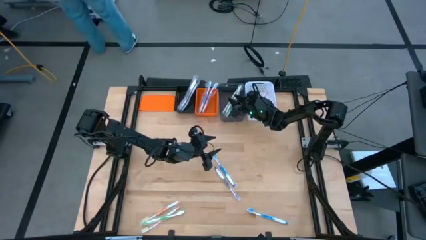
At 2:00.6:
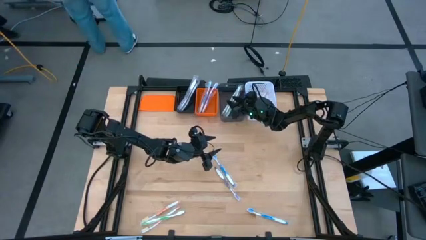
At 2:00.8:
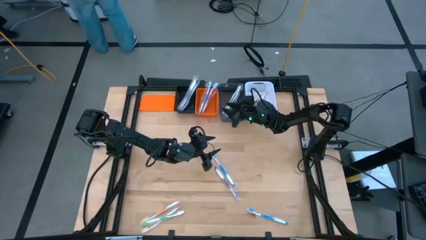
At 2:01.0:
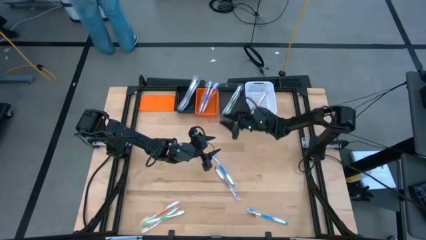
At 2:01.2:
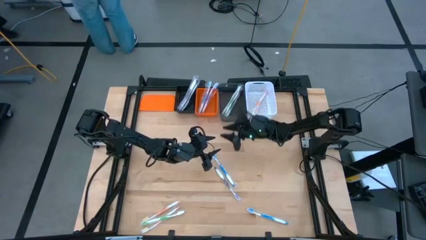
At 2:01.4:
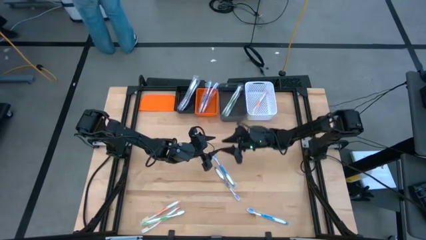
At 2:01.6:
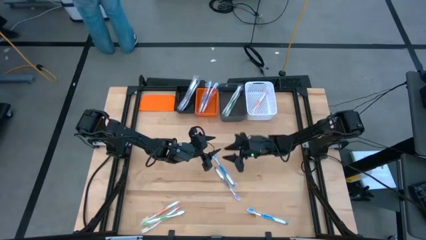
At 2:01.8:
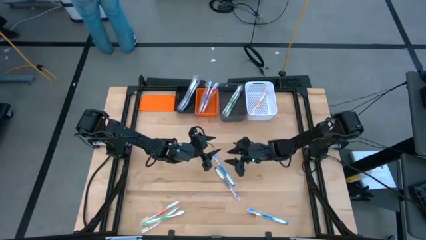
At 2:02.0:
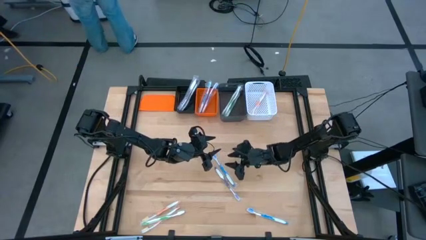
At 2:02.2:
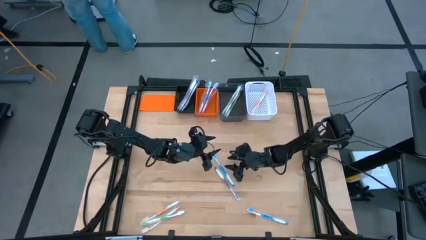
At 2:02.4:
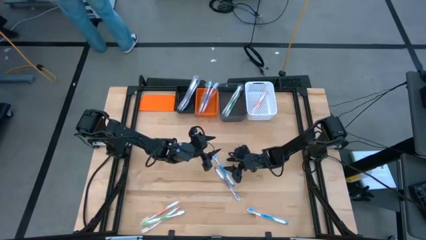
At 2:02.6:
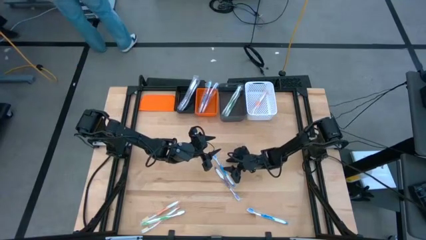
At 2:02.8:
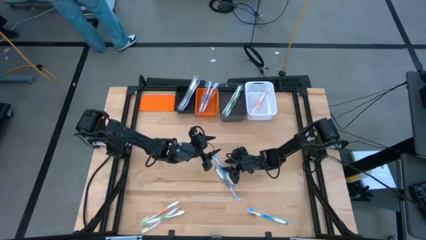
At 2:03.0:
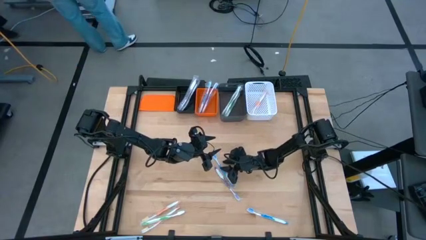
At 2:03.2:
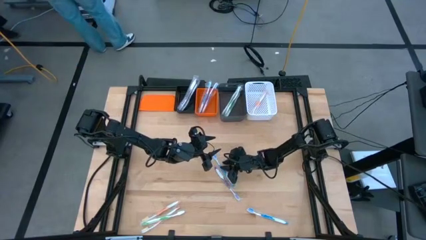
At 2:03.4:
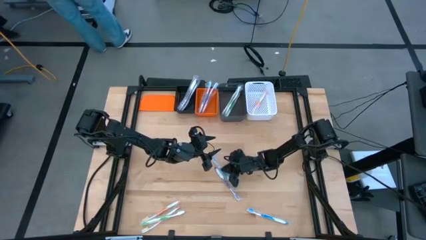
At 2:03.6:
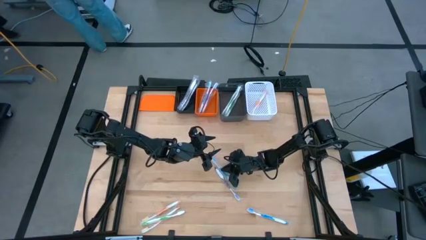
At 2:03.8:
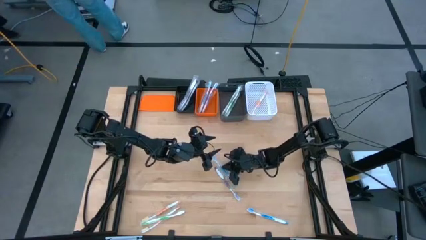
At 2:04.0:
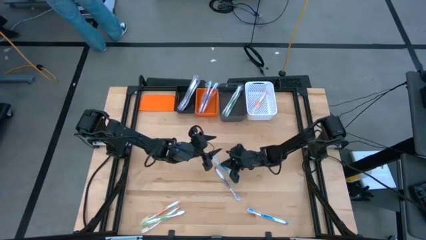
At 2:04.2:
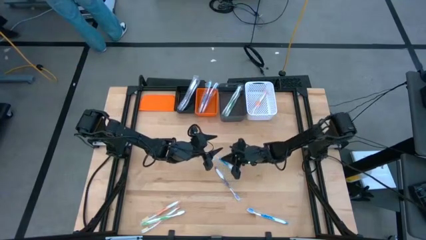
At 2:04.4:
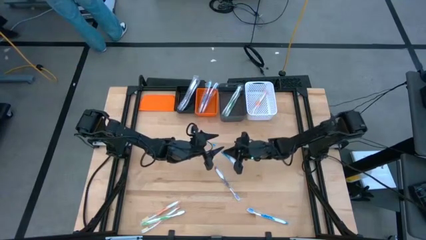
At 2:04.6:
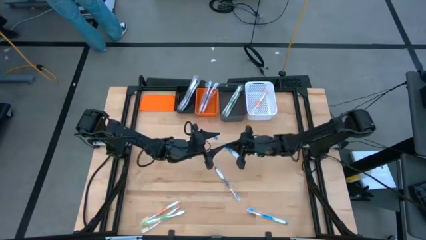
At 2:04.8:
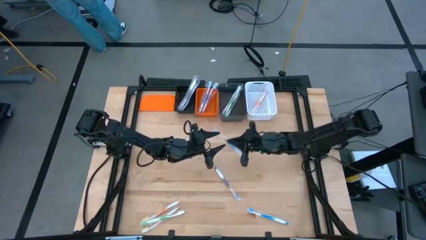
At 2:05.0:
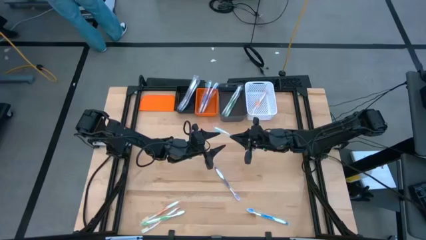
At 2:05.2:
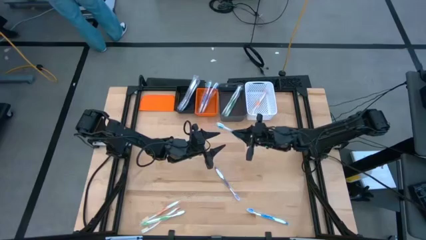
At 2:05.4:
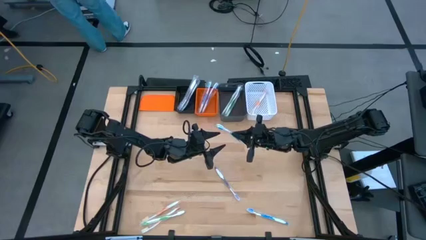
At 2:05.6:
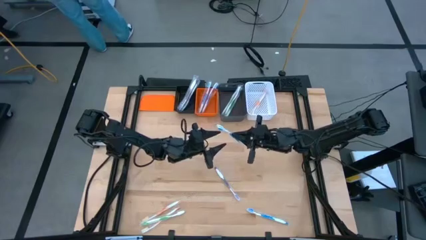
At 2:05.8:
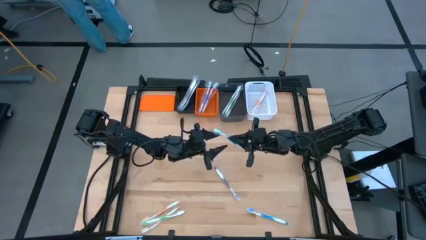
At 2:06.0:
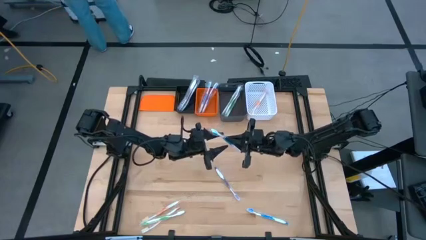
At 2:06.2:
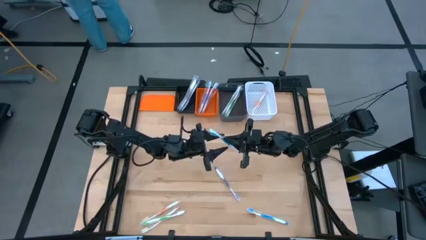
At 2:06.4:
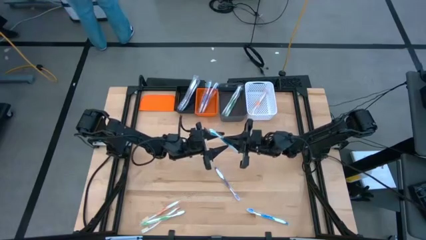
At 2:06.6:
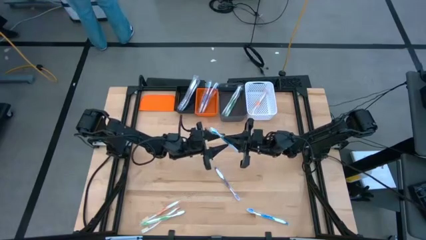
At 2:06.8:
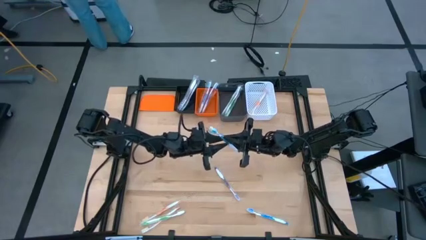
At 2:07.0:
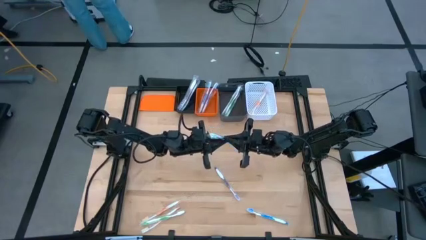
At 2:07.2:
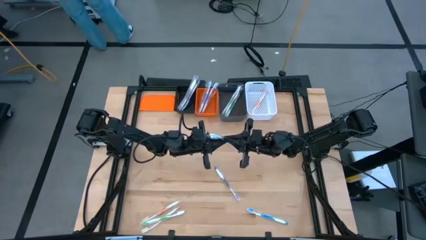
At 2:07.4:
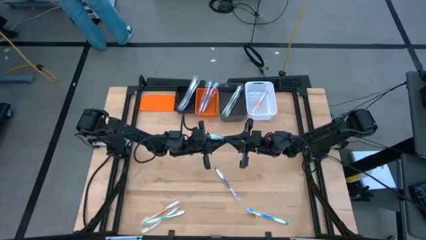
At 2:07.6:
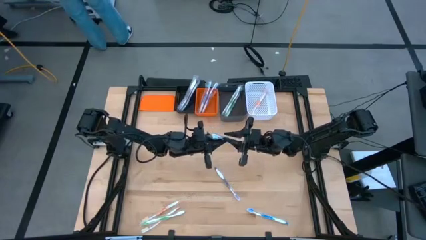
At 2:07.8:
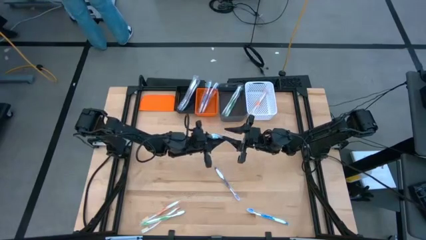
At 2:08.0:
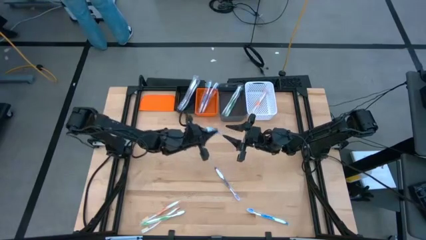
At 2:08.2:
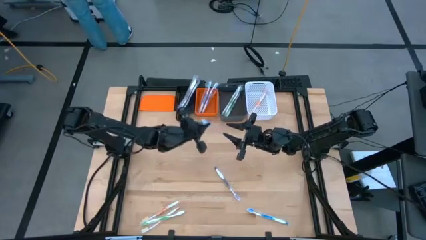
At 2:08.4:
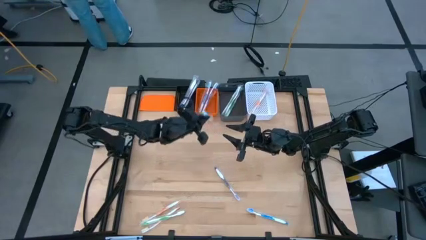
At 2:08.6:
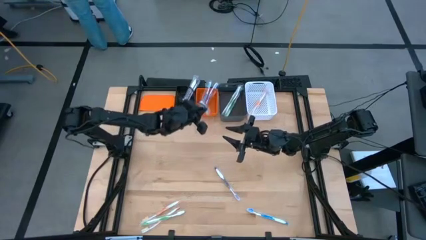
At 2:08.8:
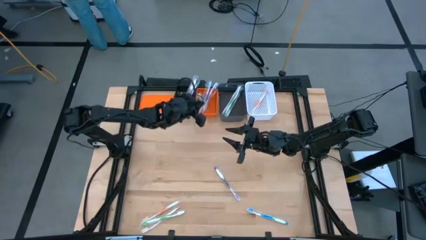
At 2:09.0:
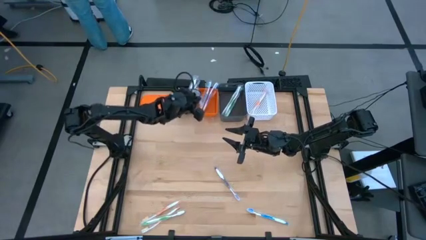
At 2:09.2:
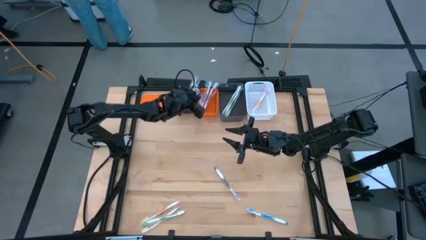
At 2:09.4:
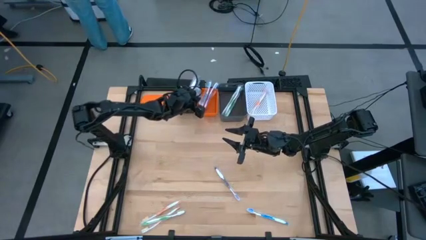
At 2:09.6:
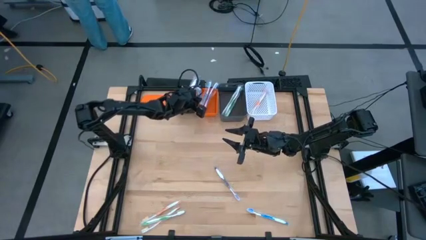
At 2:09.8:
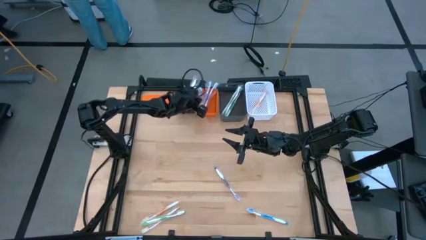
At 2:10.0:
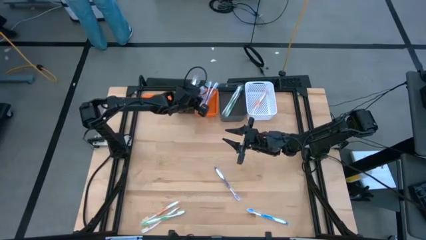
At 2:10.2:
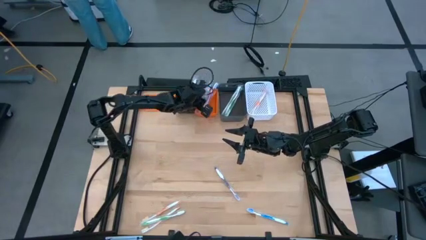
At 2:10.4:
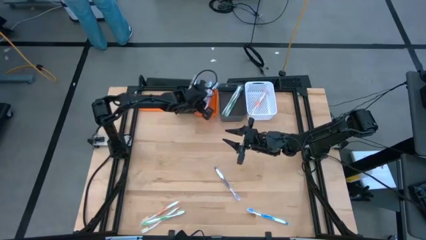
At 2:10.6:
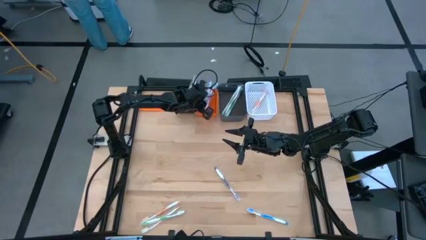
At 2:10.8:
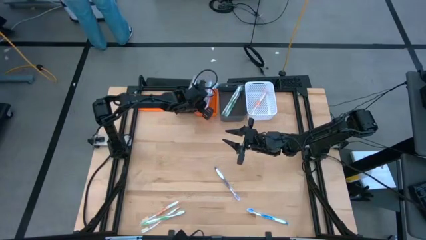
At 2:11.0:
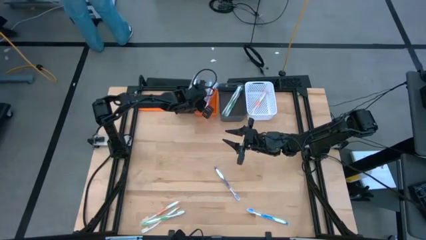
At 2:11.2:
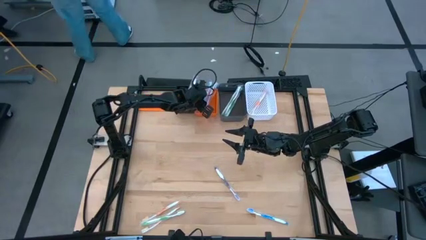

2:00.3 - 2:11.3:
Task: Pick & Place Toothbrushes
Put the blue toothbrush into the orange bin

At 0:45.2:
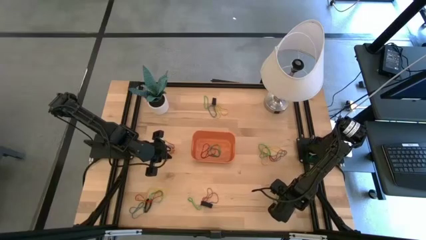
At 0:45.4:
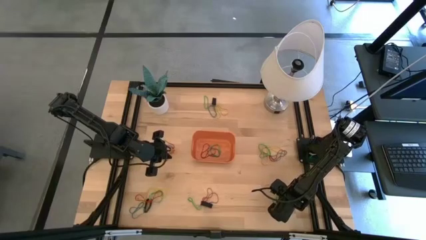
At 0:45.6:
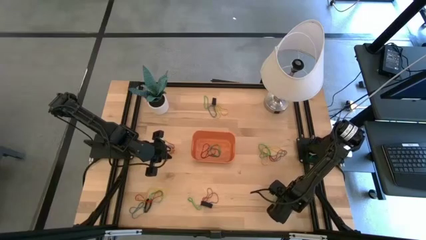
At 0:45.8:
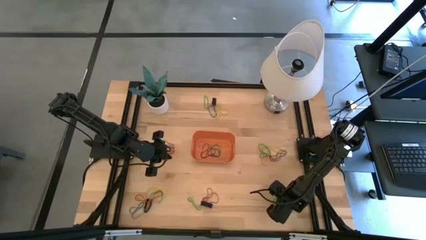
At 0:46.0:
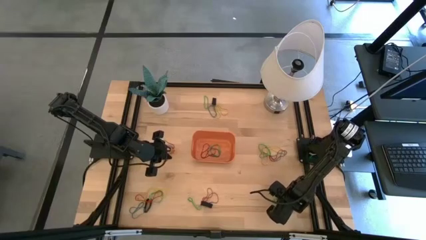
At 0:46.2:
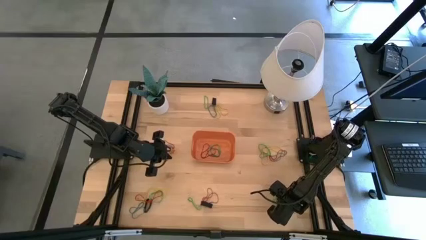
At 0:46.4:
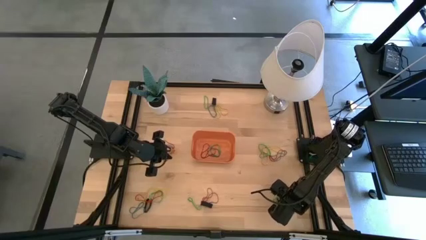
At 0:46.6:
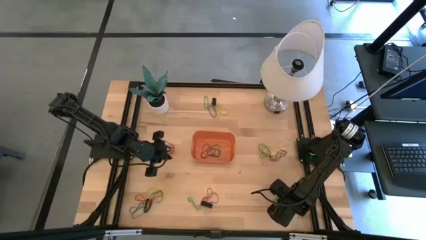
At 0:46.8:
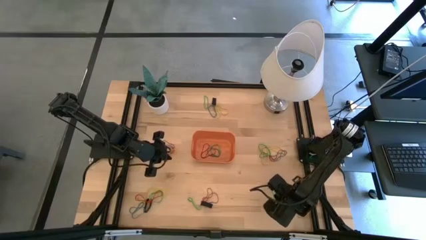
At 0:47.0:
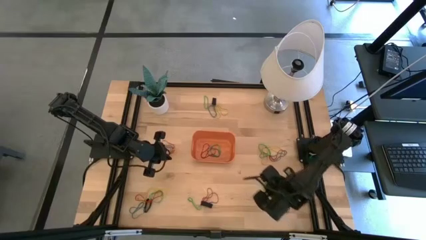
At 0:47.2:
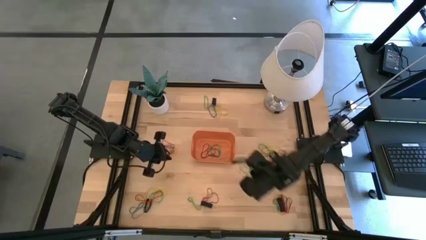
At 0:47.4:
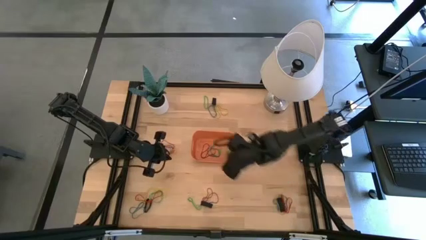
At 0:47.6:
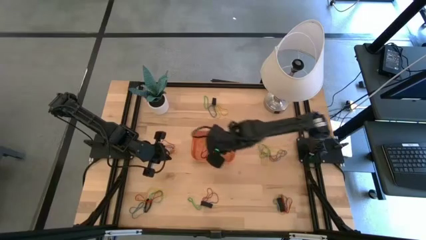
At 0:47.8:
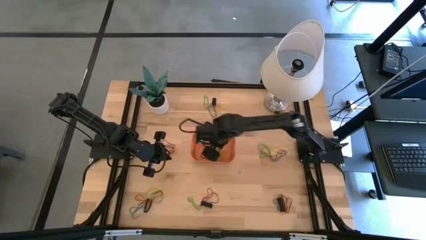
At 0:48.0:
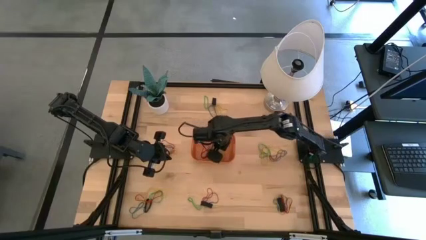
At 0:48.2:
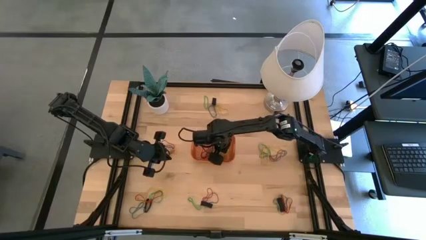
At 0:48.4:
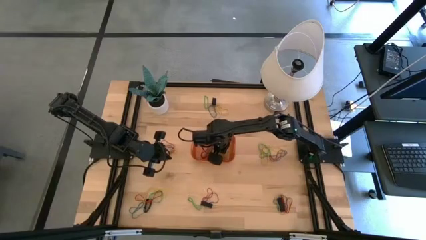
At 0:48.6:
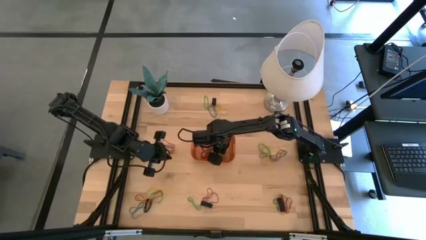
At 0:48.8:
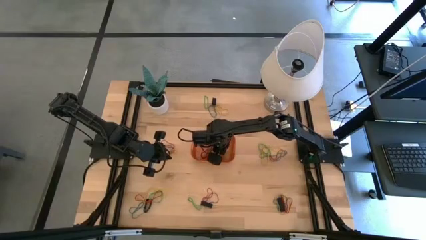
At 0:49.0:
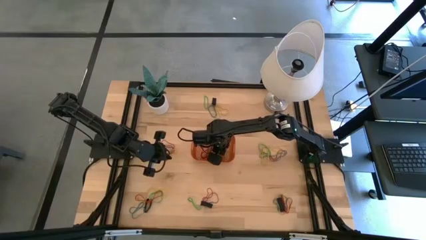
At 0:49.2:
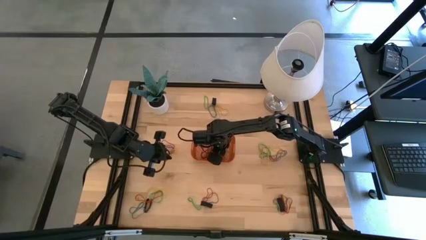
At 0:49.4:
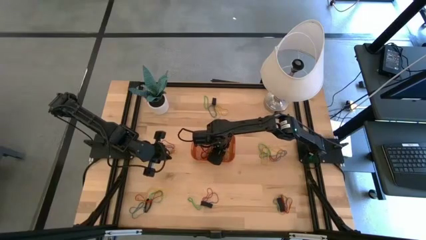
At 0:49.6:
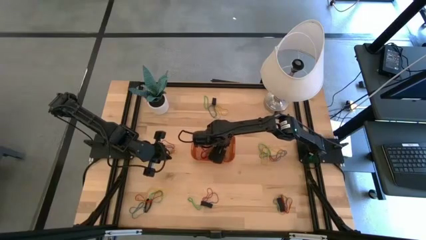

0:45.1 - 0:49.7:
Task: Pick and place rubber bands into bin
Put the green rubber band into the orange bin

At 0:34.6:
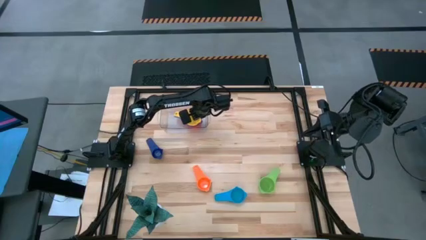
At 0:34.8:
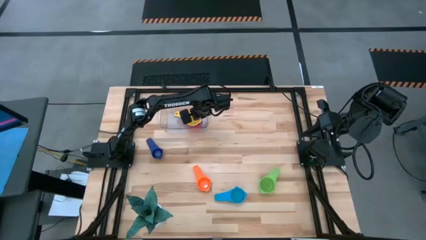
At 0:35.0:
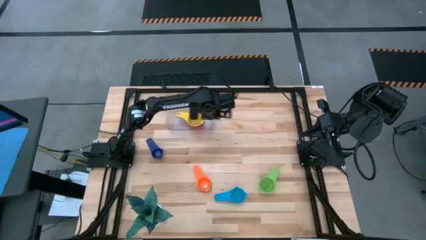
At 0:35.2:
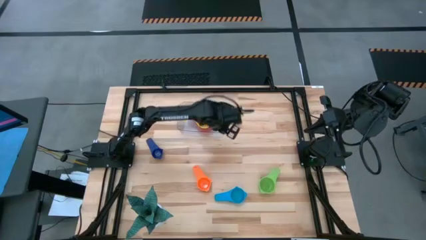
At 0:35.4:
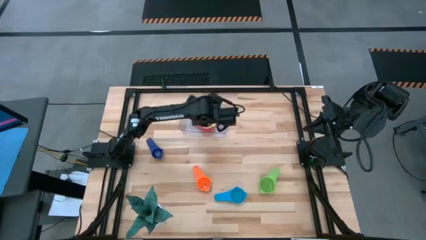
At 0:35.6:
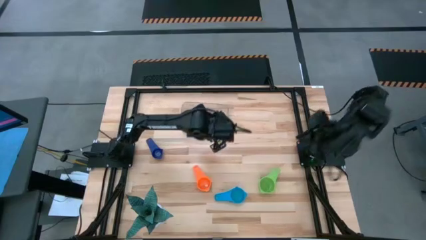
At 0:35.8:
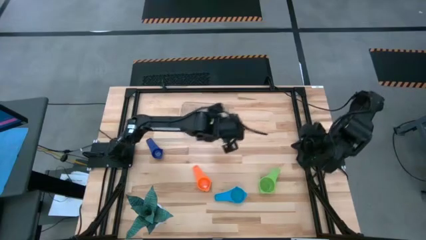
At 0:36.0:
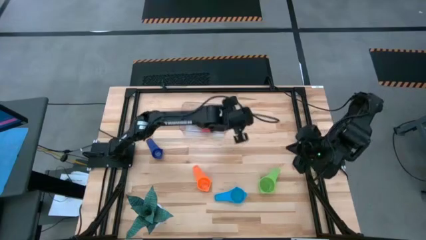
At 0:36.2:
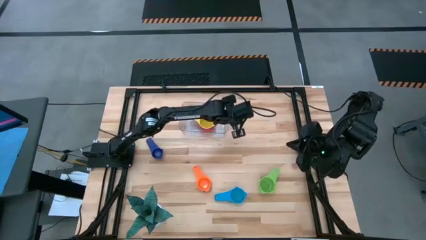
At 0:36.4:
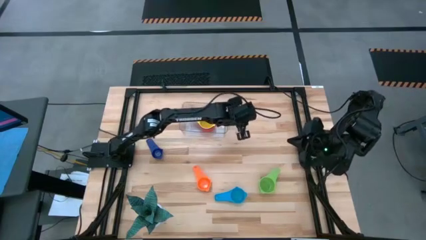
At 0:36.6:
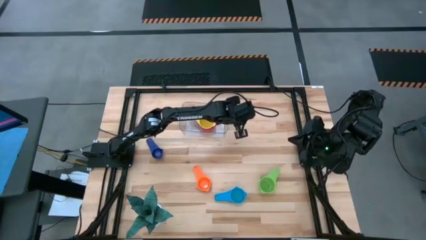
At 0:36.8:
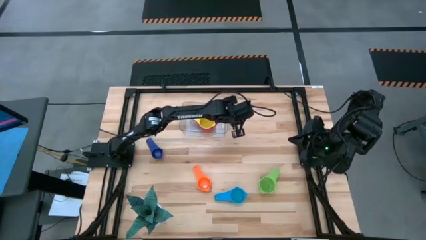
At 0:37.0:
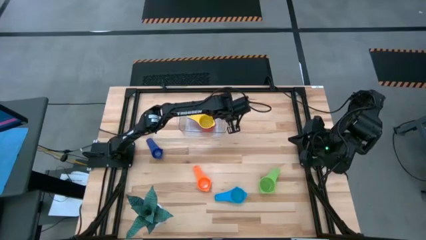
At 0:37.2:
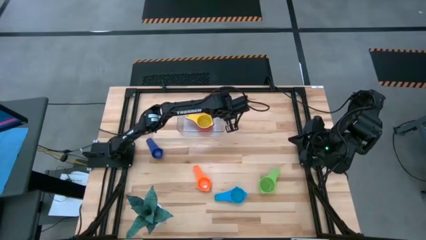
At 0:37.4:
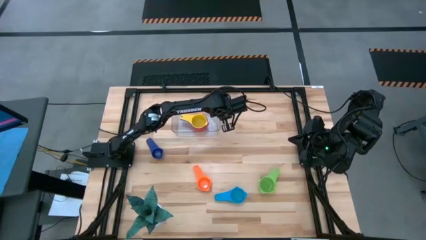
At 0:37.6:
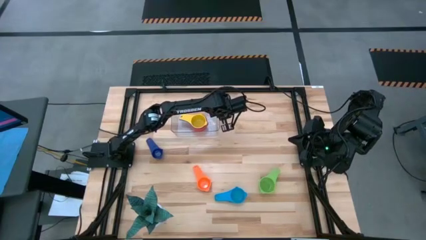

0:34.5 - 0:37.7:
Task: Nest measuring cups in basket
Adjust the transparent bin
